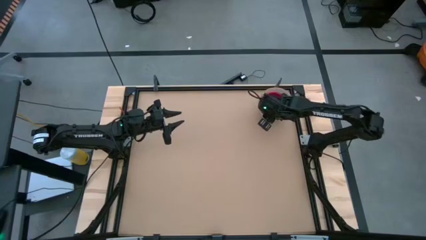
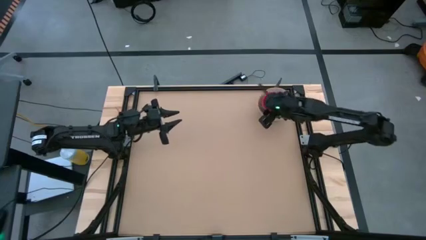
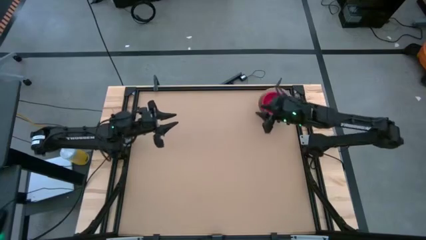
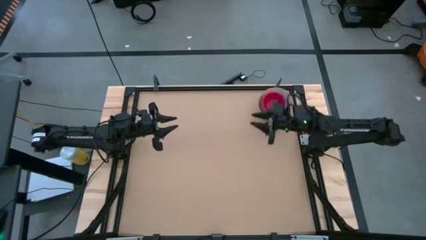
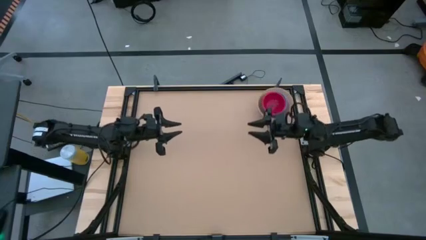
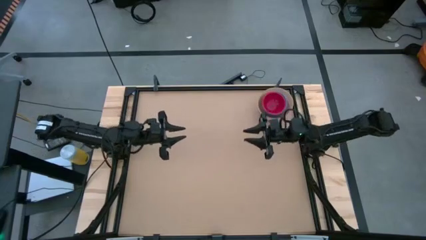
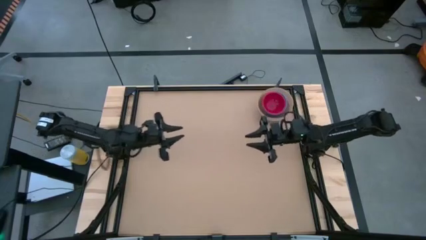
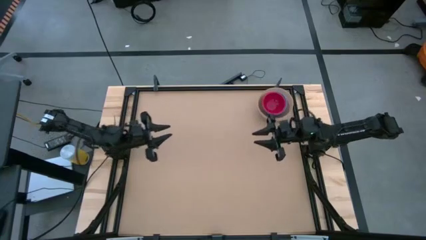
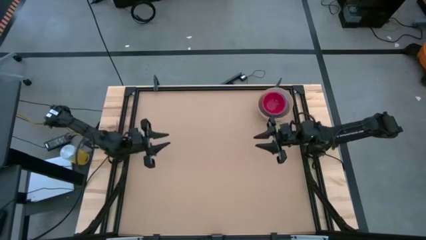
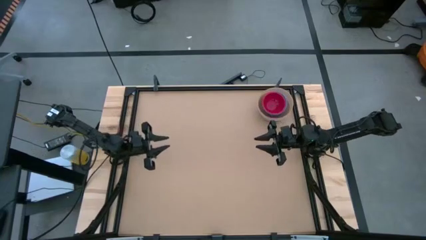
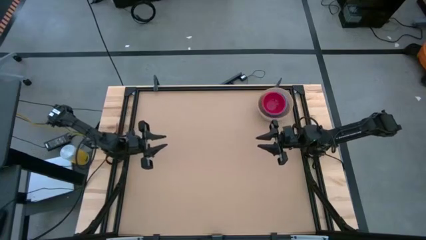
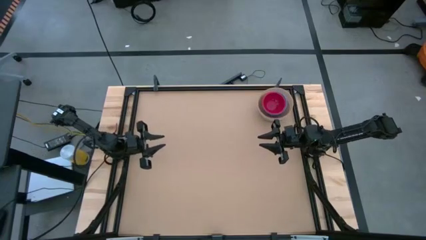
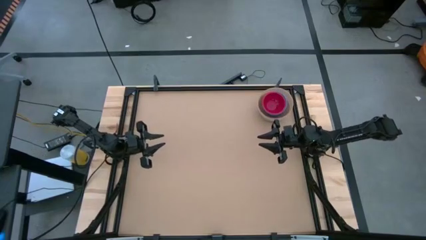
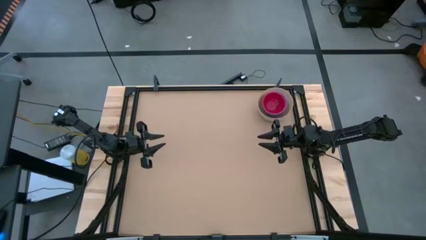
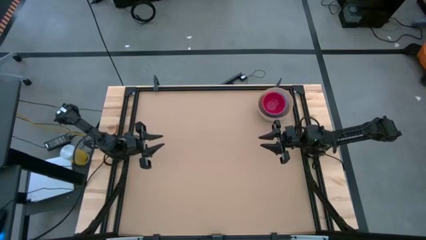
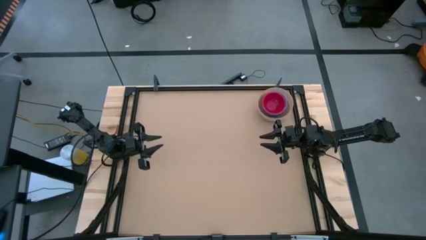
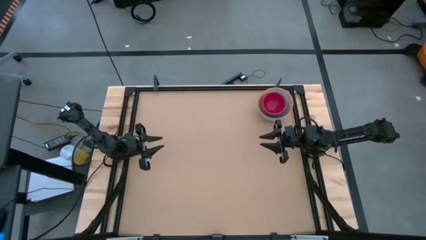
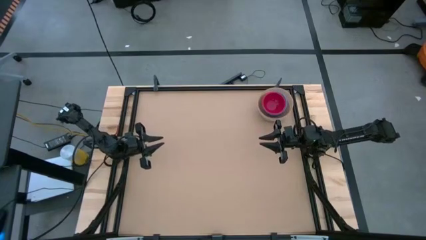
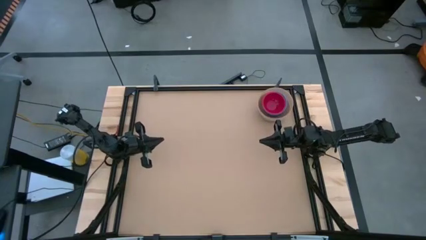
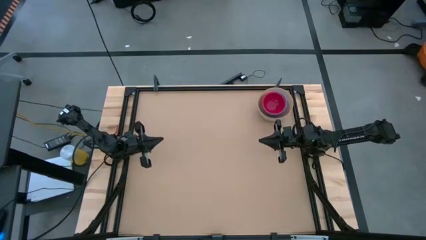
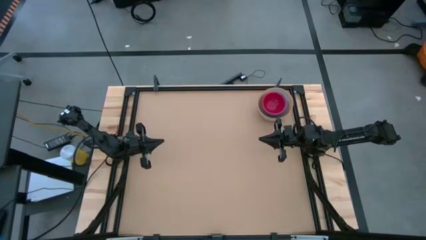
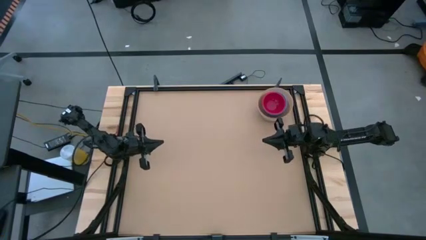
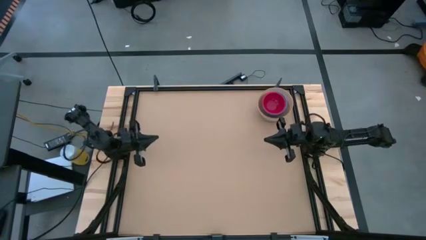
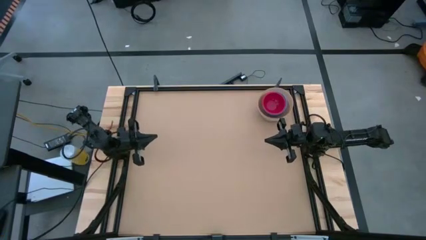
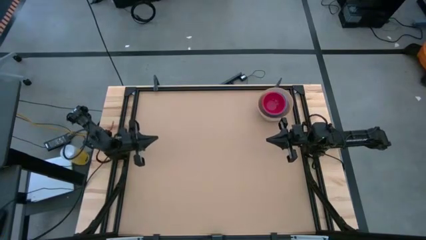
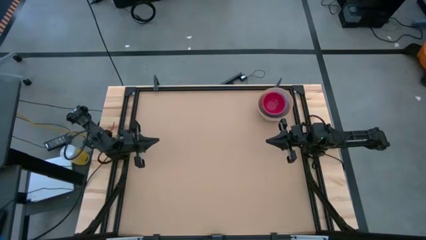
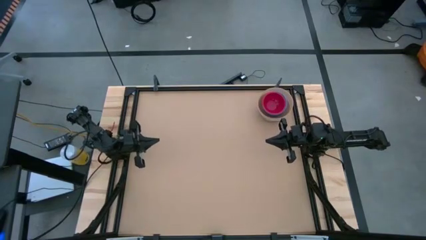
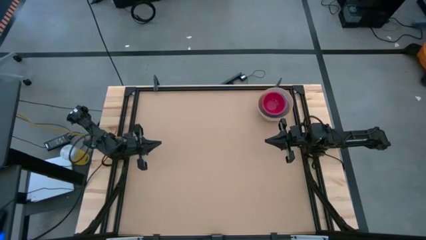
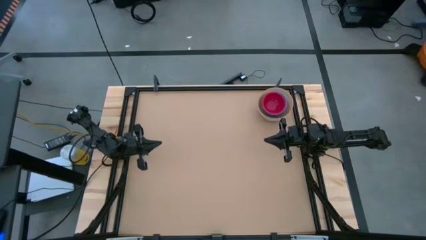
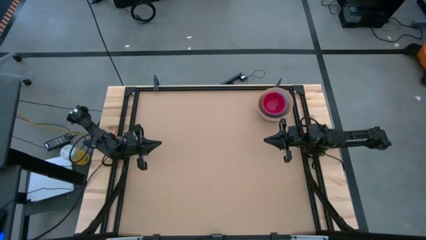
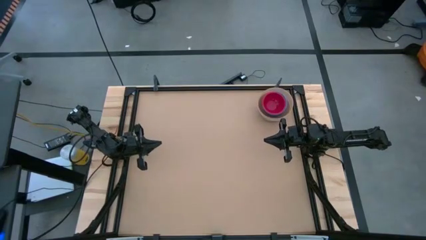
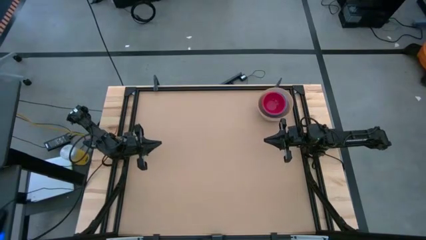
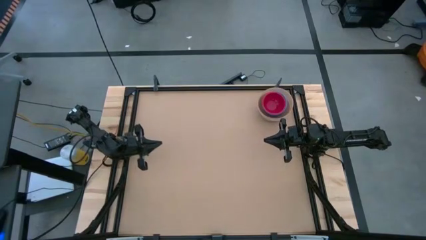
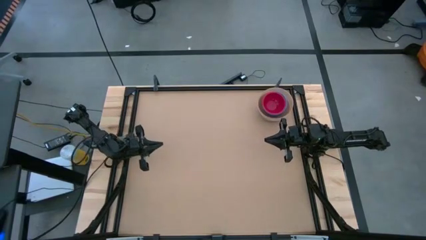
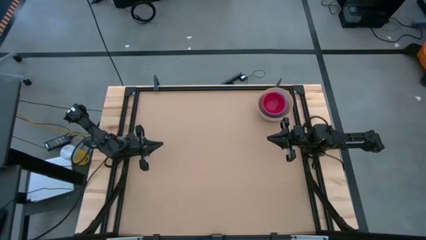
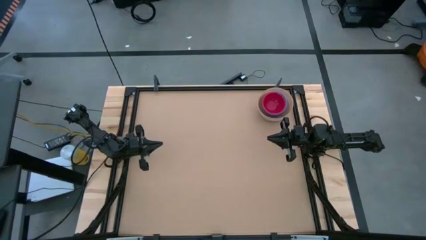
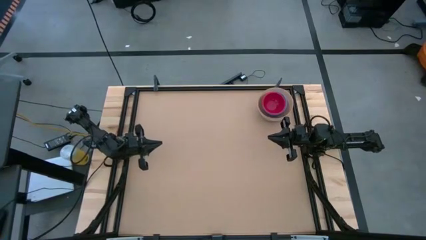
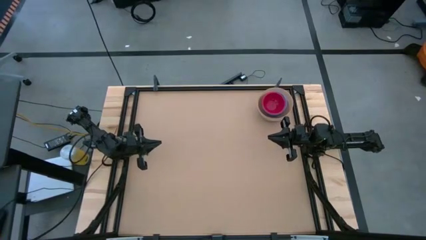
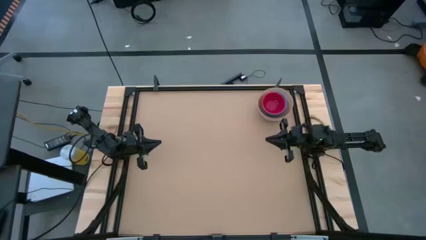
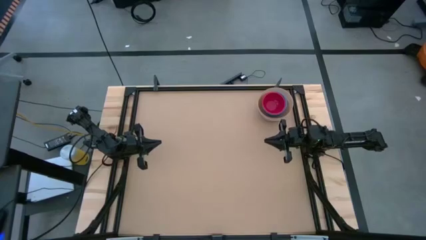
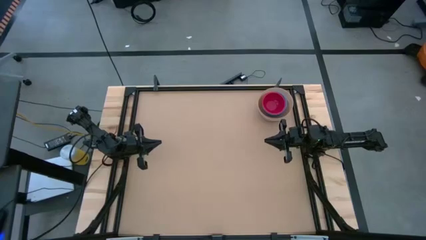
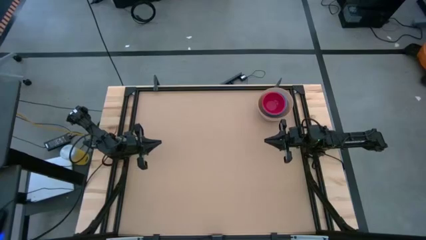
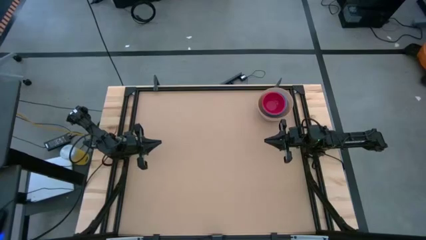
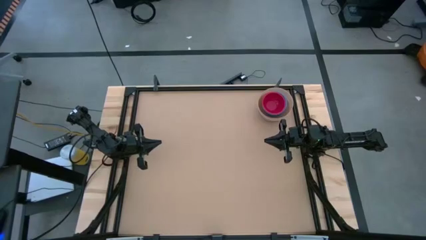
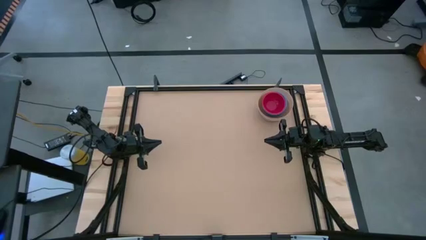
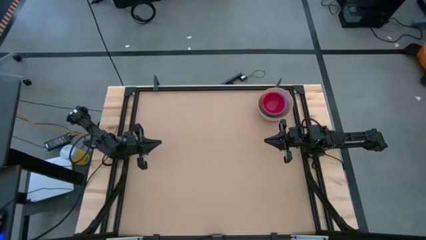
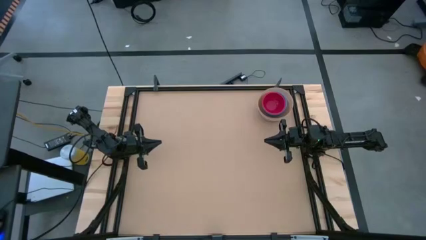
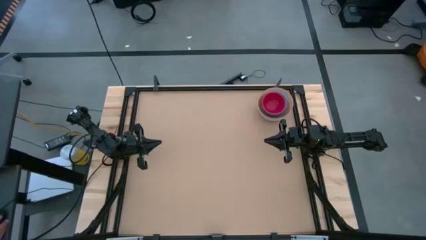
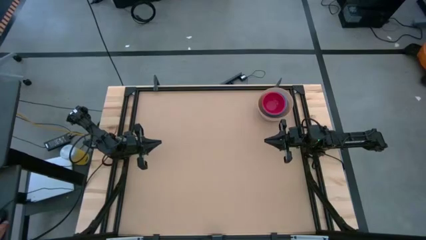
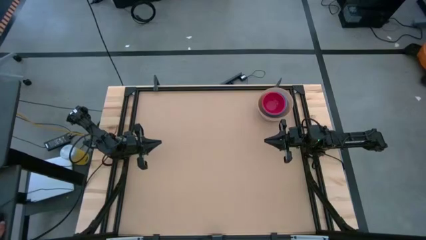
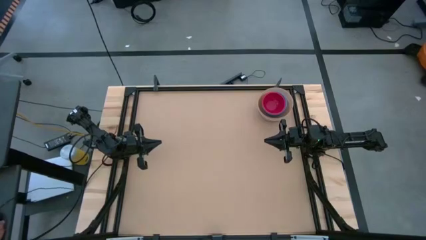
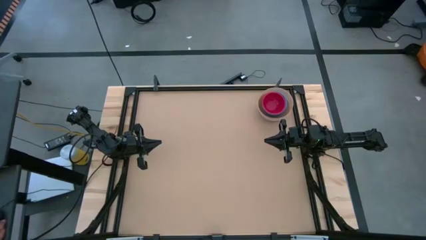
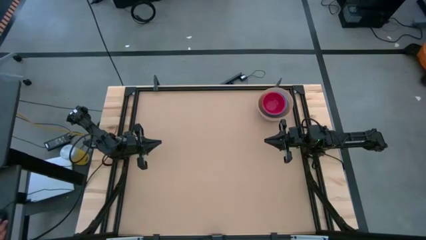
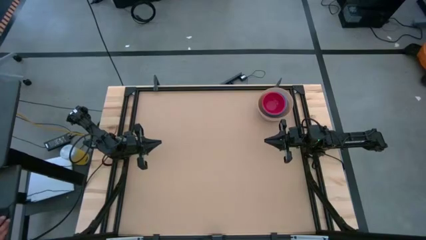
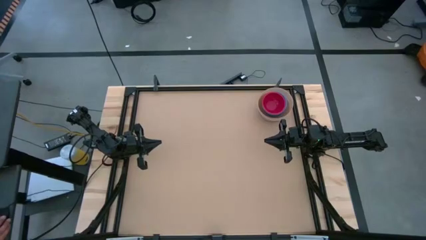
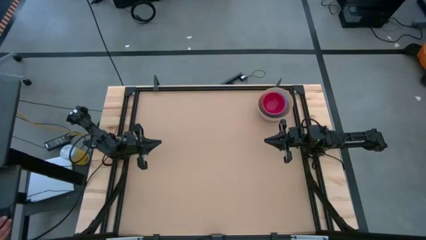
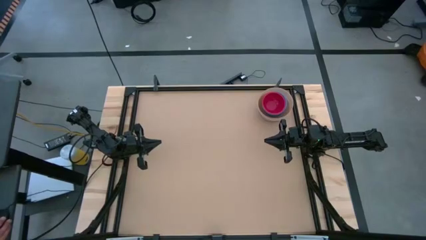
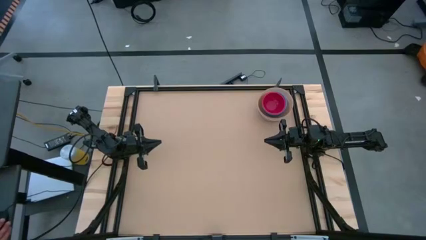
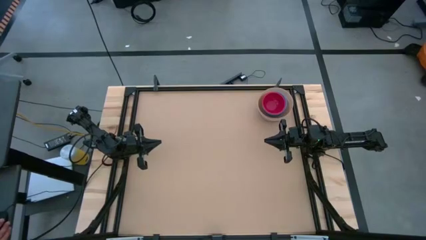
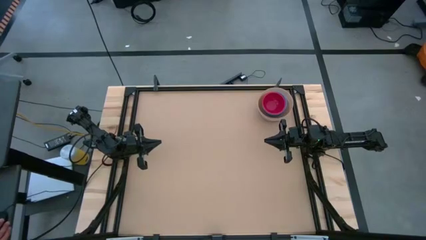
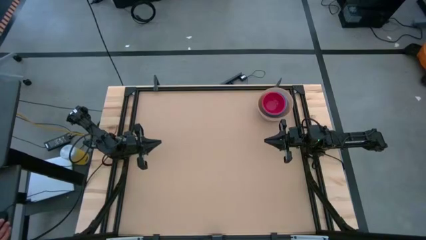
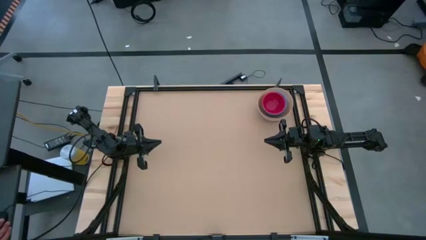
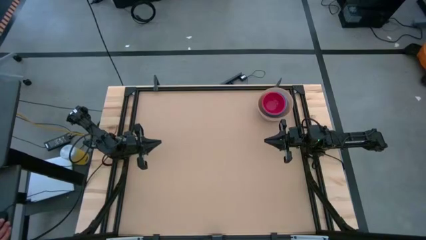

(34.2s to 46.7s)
Return to Home Position

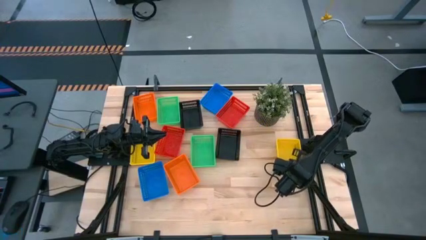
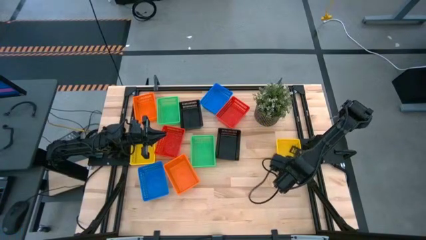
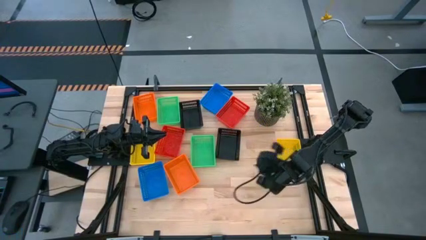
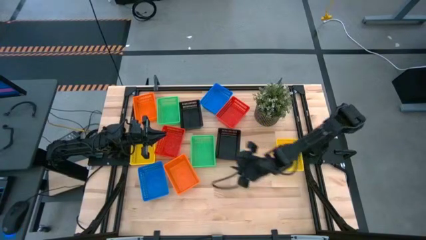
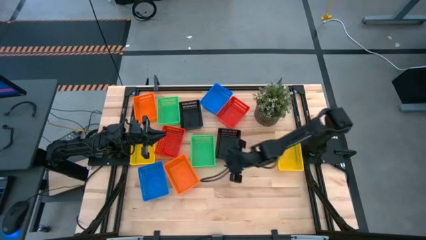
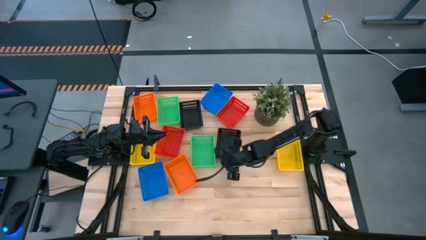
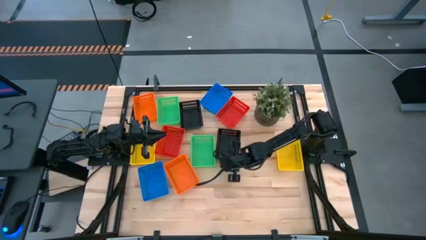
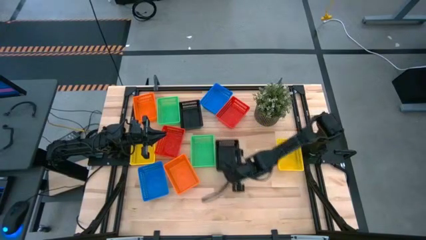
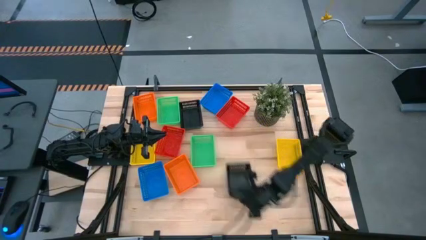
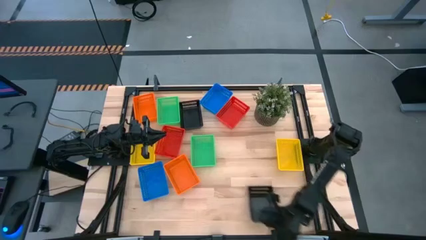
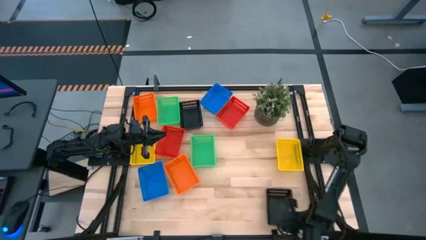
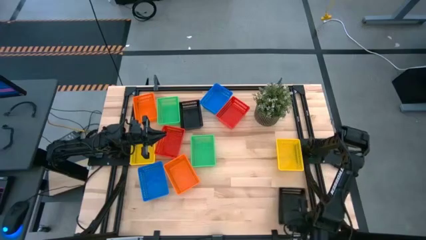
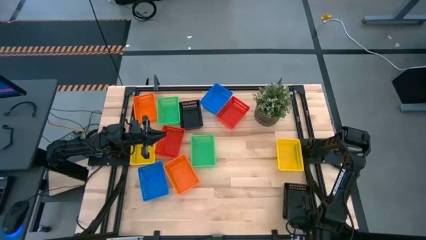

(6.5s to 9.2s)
Move the bottom black bin to the bottom right side of the table

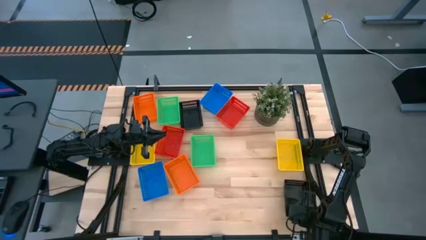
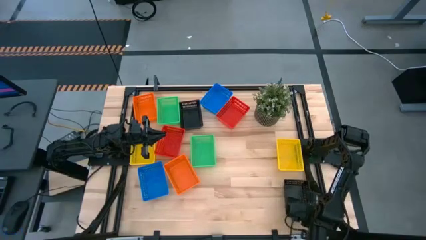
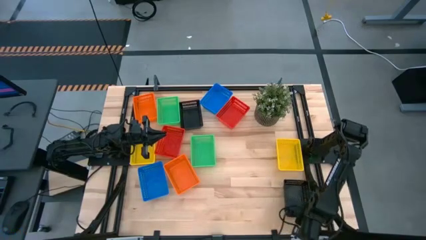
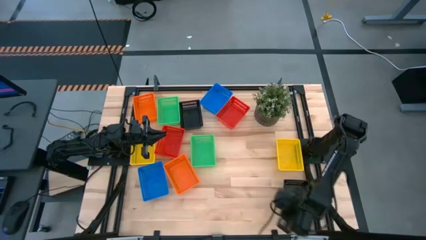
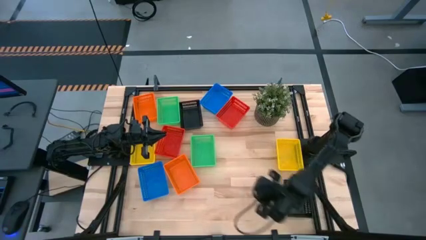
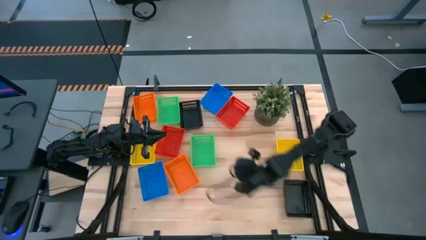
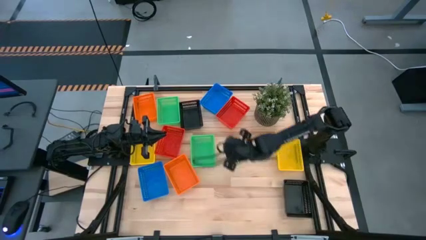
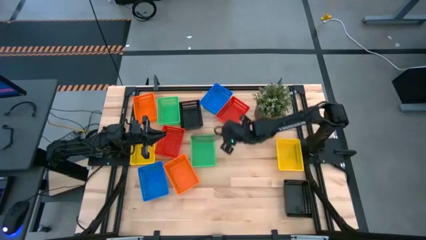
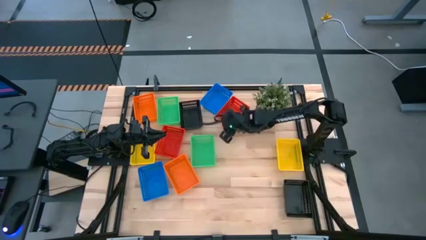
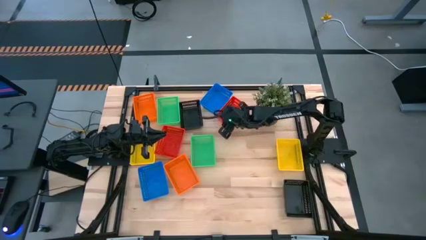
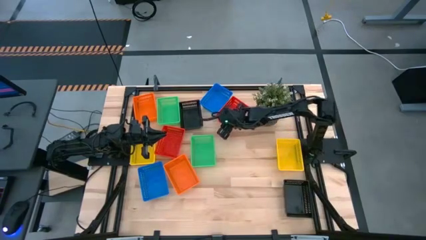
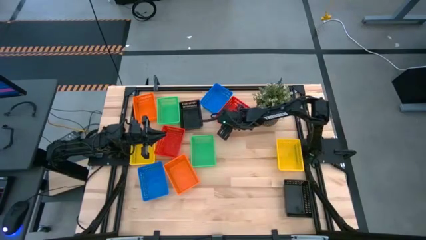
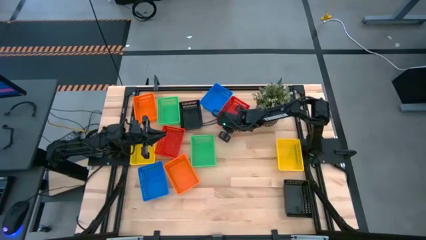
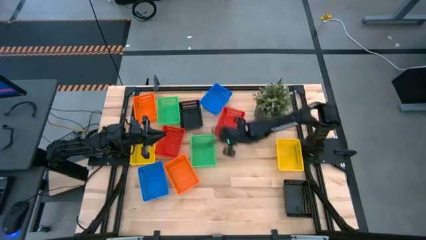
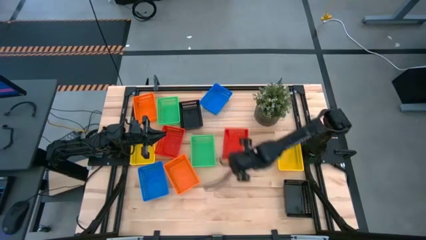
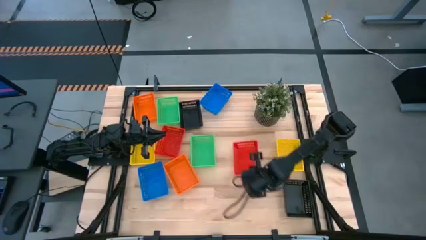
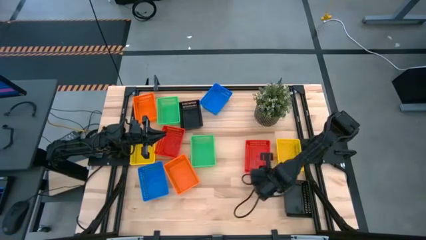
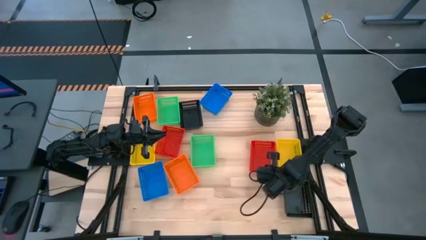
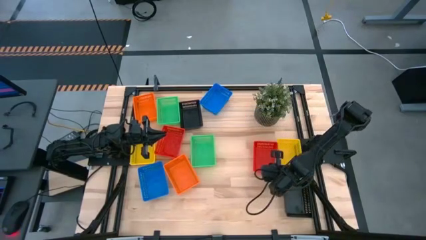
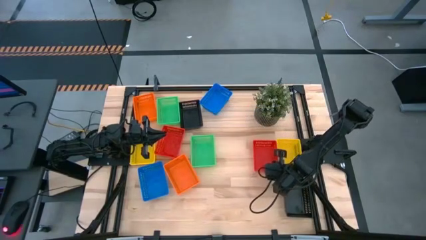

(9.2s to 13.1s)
Move the top red bin beside the yellow bin to the right side of the table
